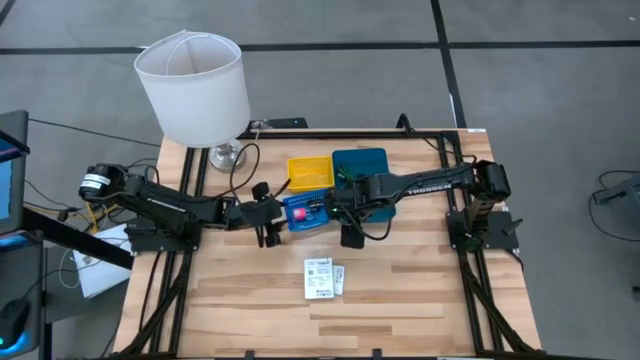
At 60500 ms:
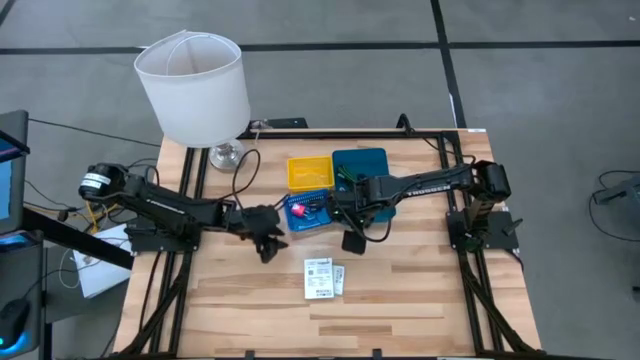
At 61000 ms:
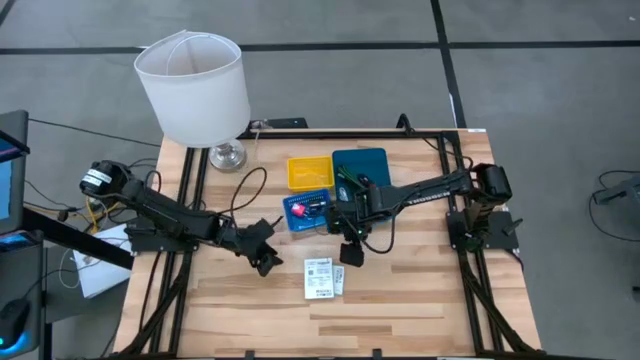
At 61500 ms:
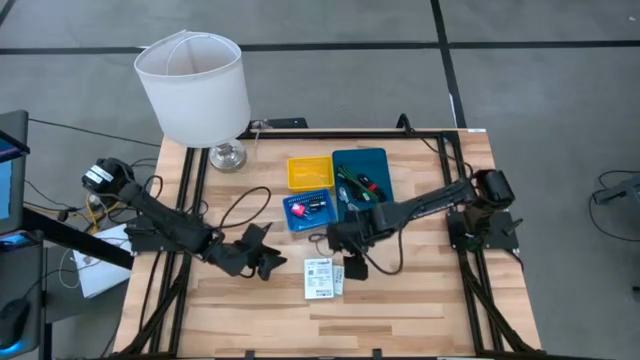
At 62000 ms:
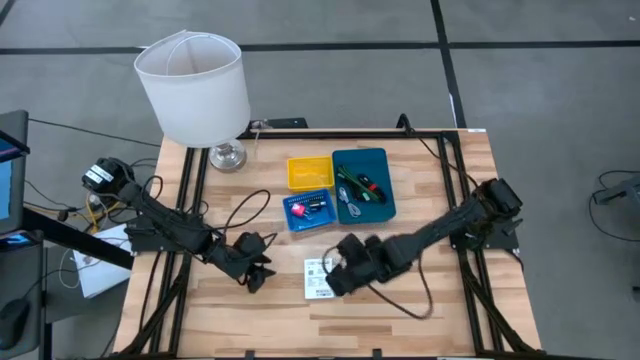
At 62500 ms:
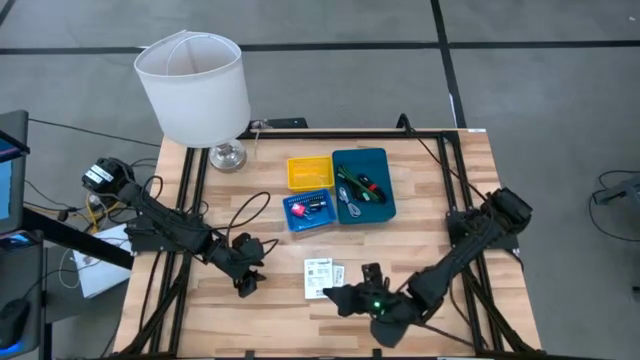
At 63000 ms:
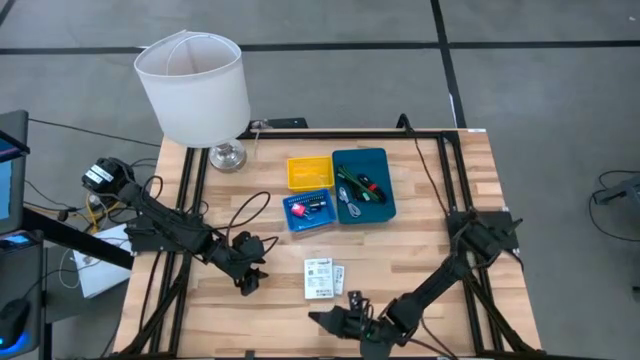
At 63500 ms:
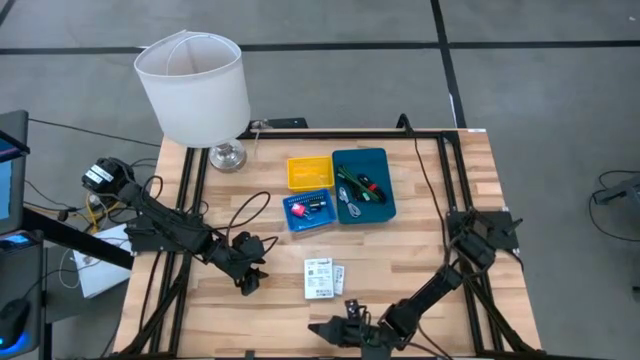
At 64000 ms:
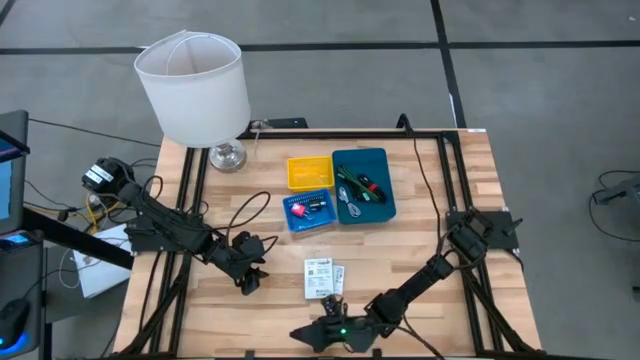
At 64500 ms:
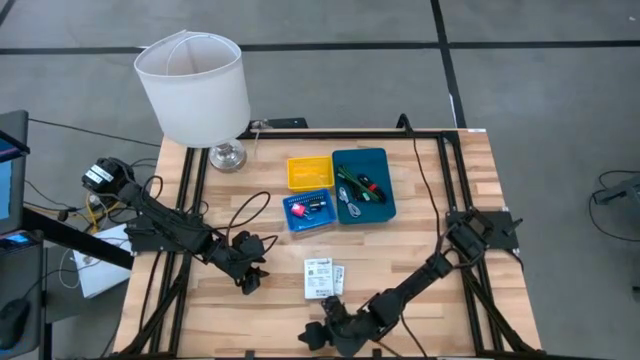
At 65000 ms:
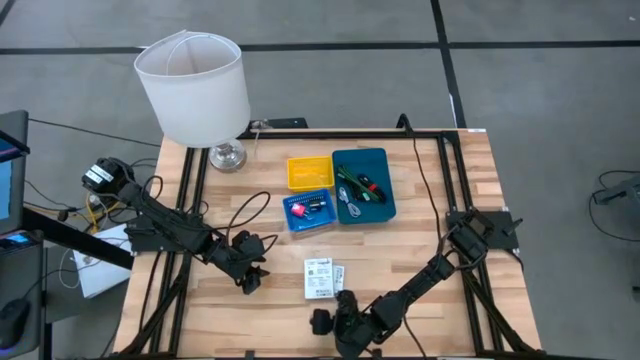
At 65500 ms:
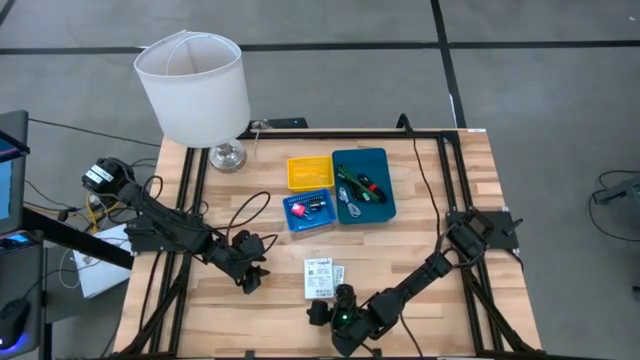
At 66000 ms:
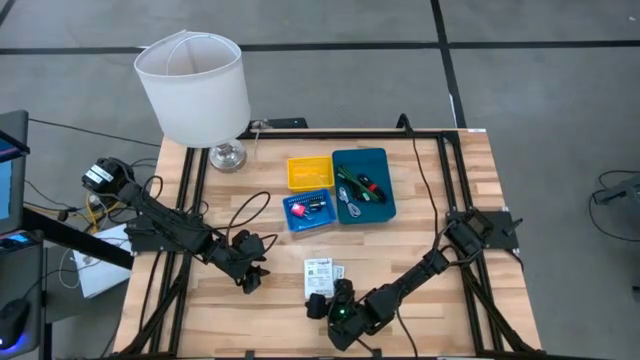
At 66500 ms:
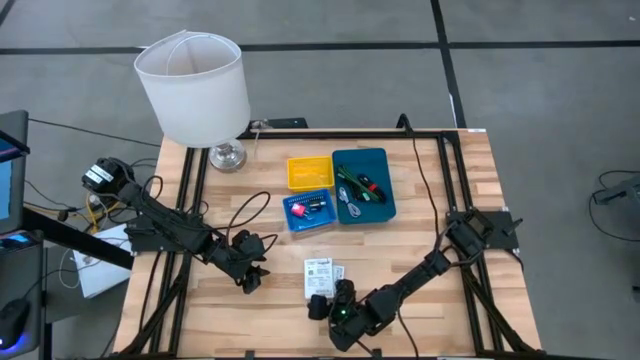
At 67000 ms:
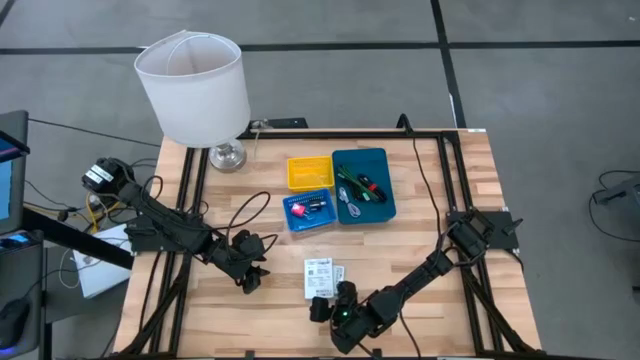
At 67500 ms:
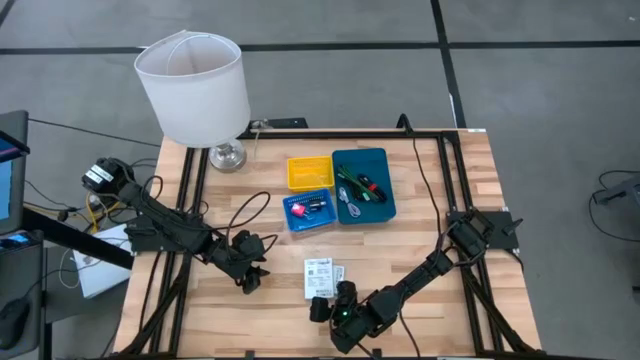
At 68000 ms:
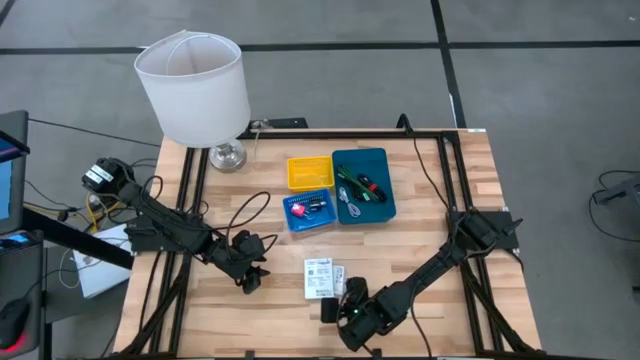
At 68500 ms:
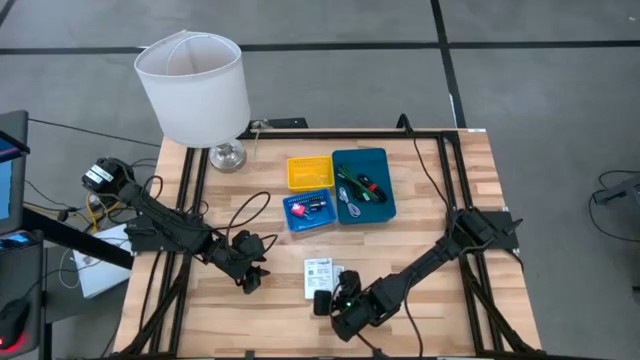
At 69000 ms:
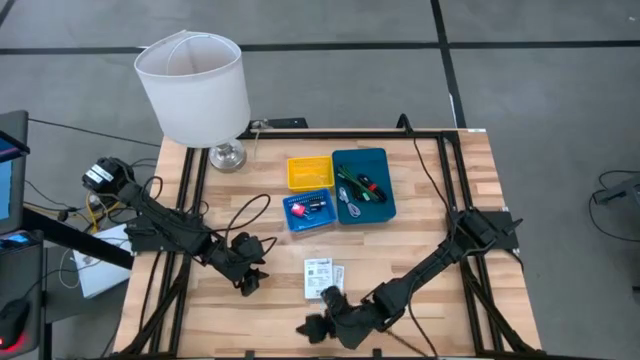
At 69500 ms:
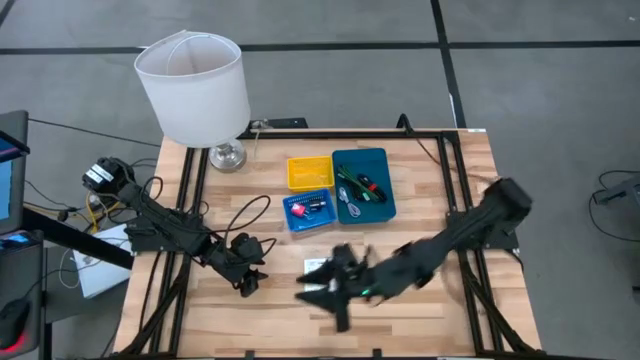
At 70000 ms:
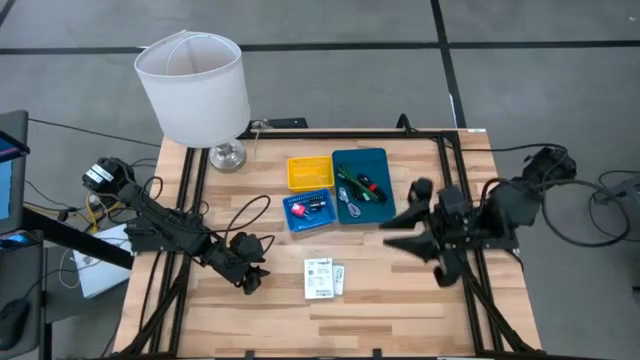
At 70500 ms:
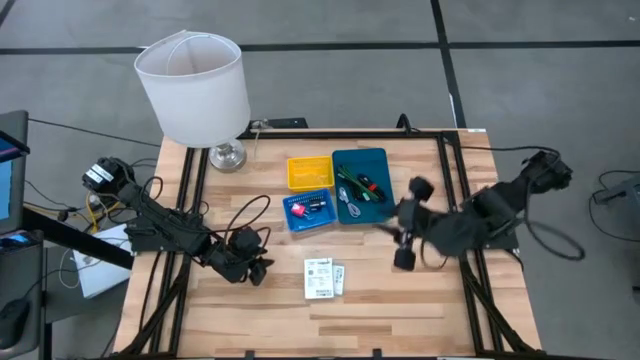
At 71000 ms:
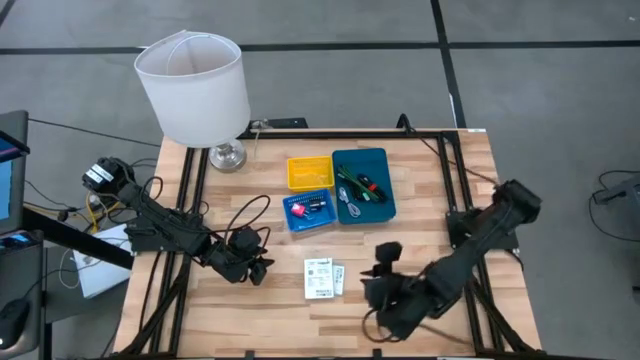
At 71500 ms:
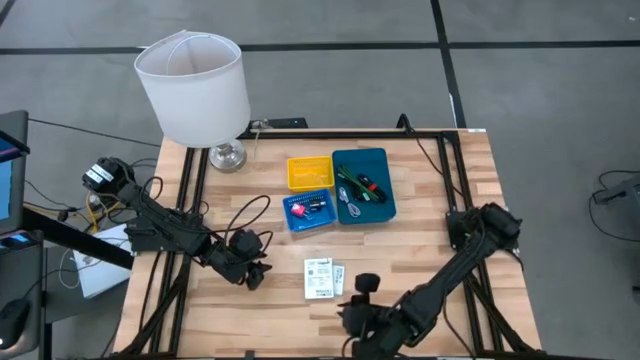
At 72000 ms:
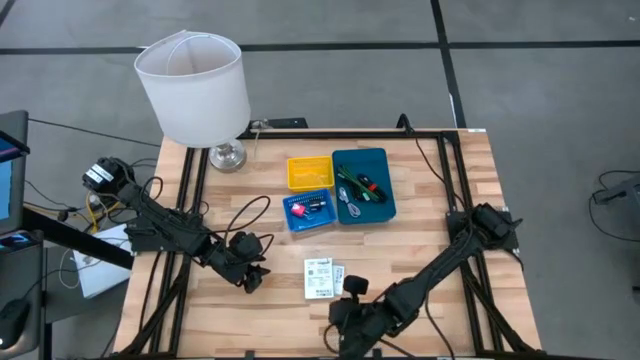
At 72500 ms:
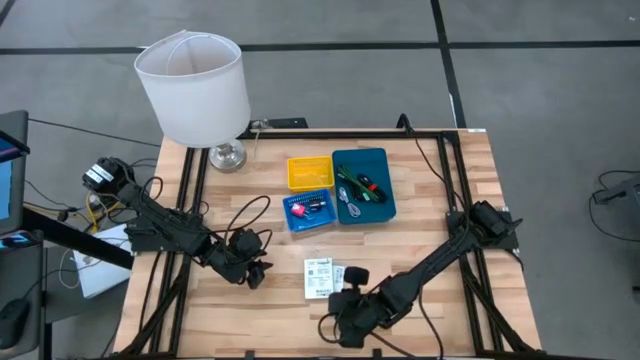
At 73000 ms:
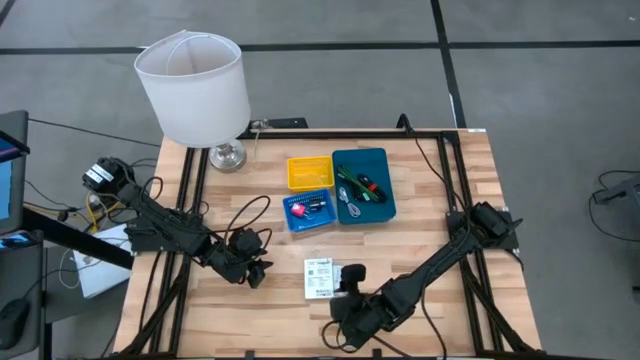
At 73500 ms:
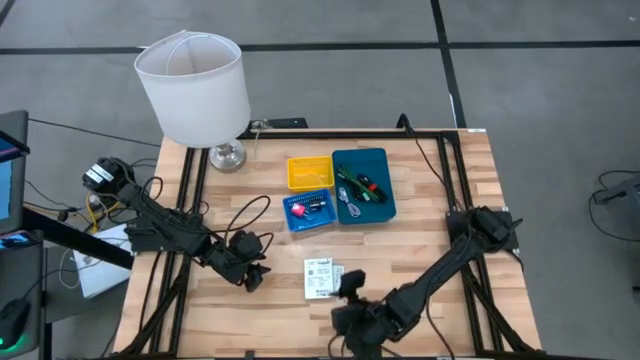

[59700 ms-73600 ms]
Task: Pick and place items into bin
Put the top white card reader box into the yellow bin

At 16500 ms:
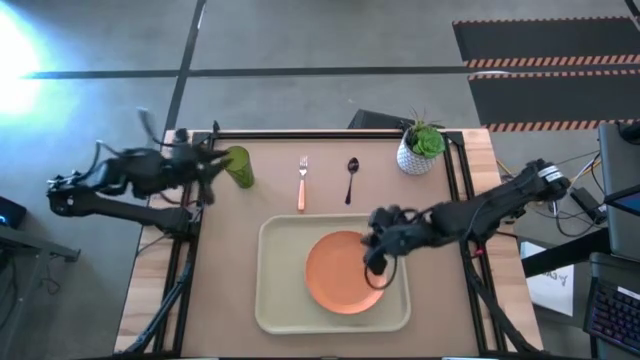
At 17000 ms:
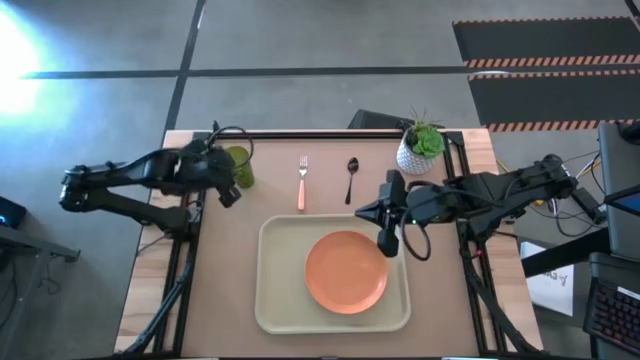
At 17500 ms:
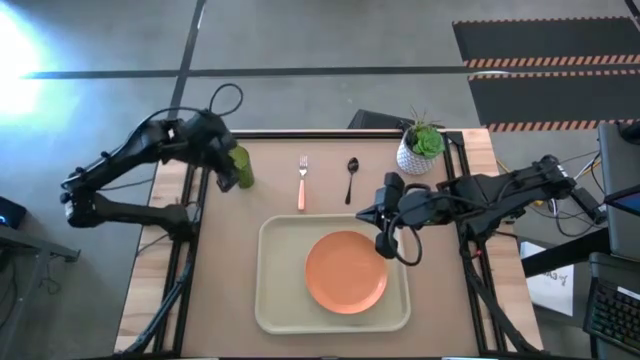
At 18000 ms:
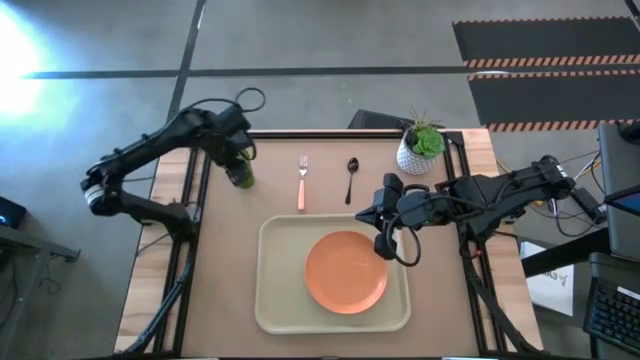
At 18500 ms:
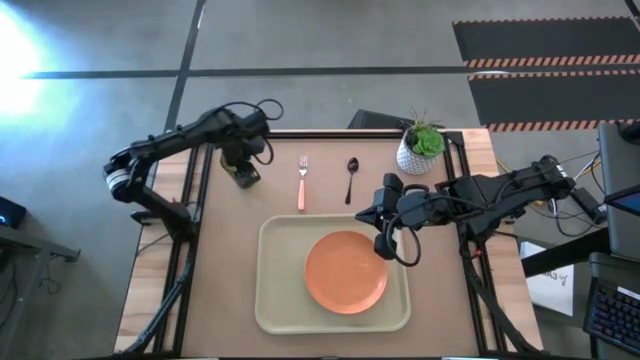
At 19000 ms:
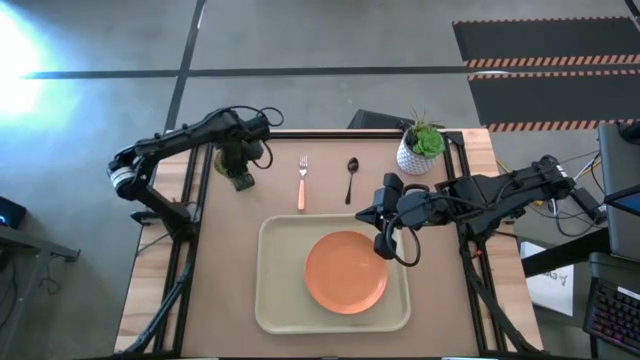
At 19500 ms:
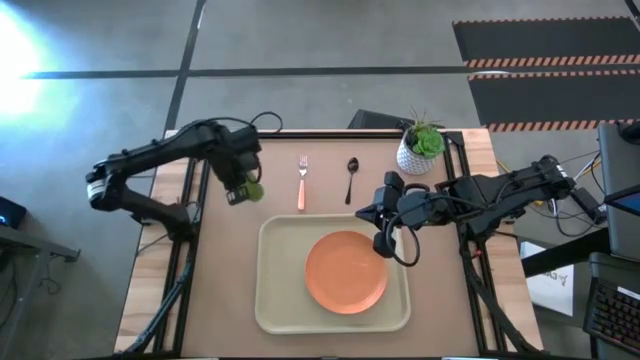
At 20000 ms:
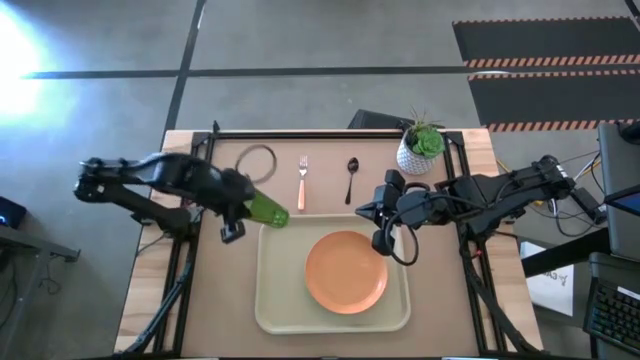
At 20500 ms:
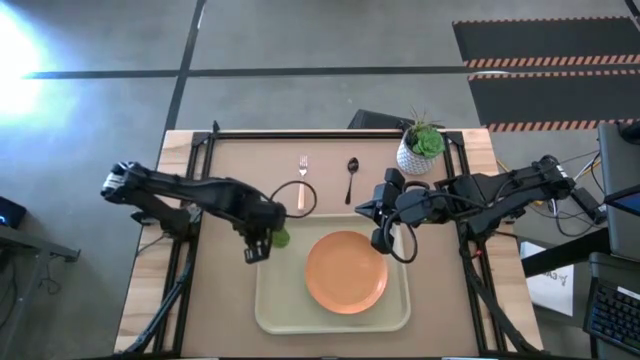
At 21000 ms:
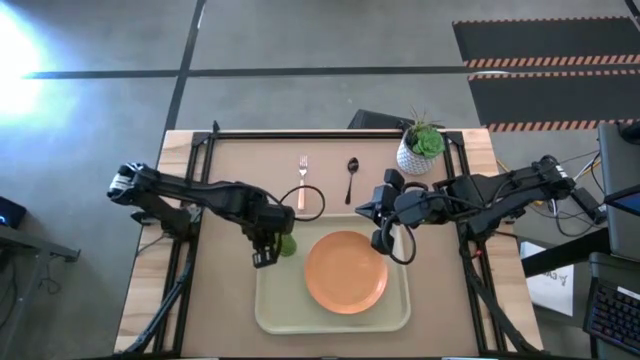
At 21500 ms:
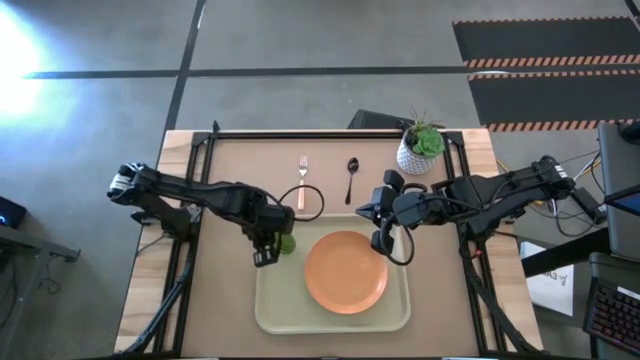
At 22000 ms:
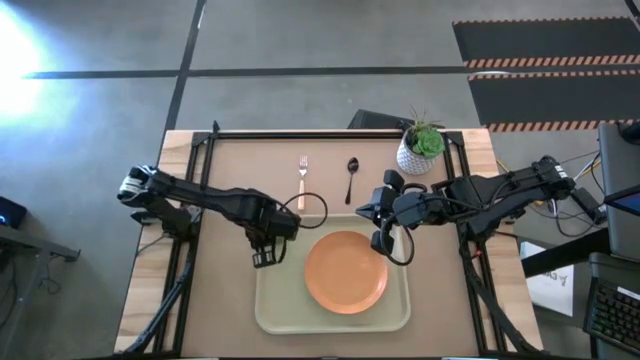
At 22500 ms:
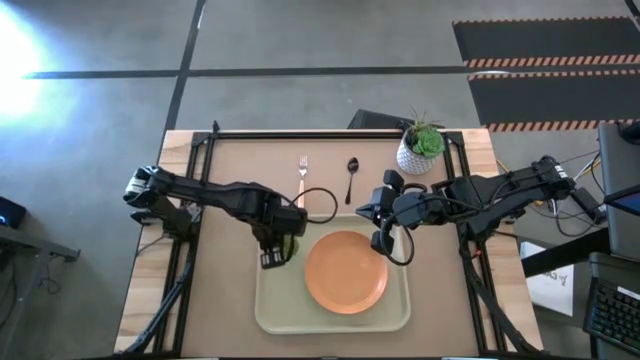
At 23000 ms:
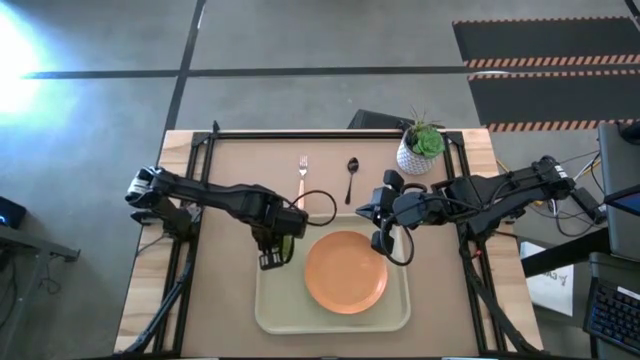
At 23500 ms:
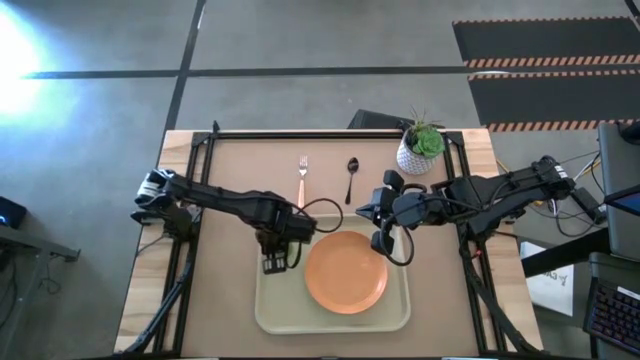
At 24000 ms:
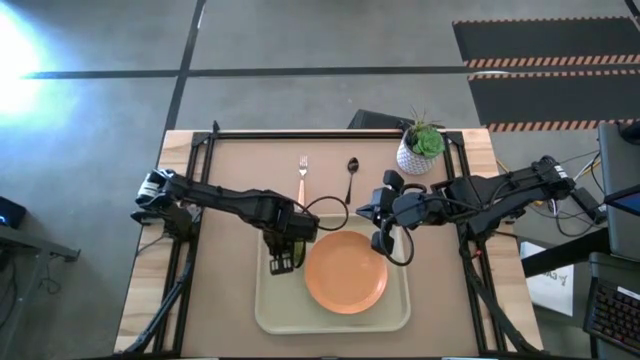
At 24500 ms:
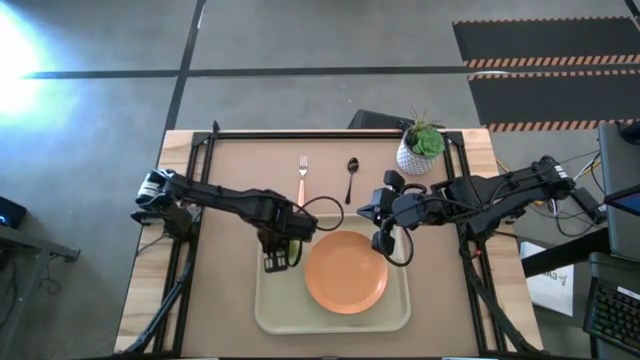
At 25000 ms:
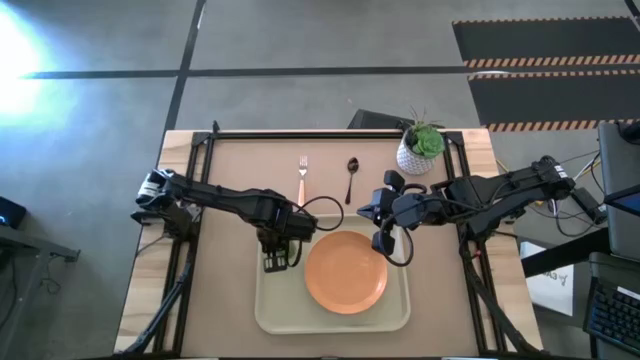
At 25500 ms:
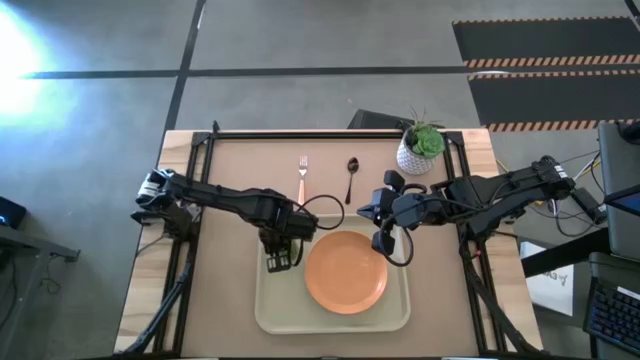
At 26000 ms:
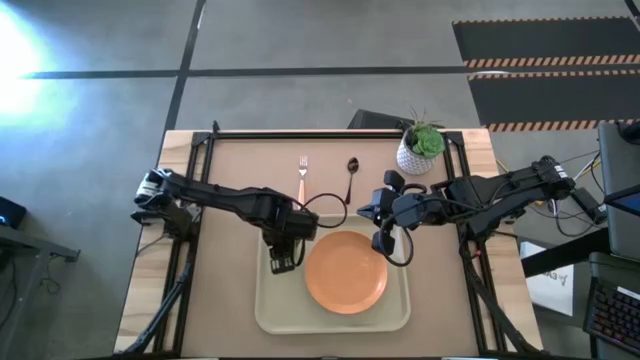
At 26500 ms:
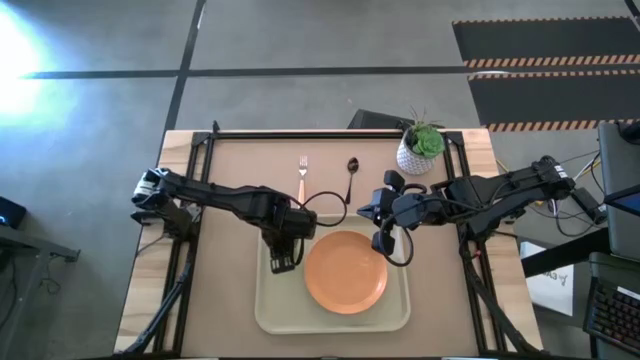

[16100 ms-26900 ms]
Task: Pick and place plate/cup/fork/spoon on tray
Put the green cup on the top left of the orange plate
